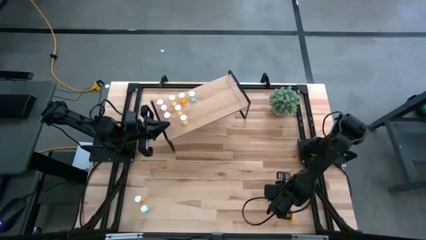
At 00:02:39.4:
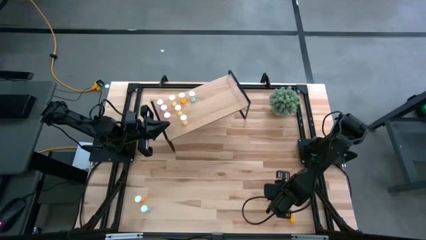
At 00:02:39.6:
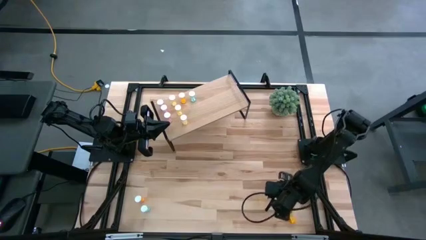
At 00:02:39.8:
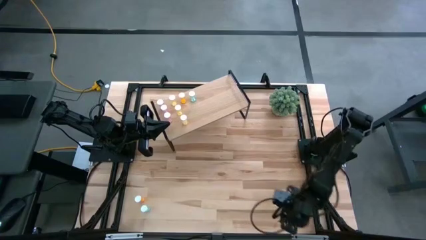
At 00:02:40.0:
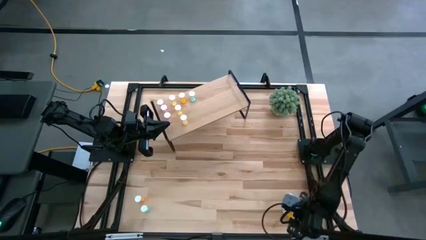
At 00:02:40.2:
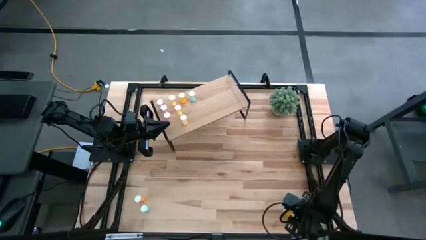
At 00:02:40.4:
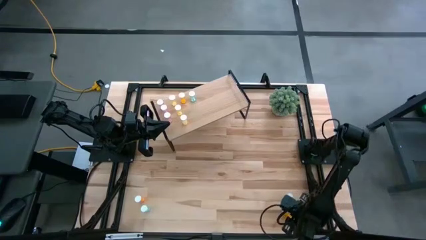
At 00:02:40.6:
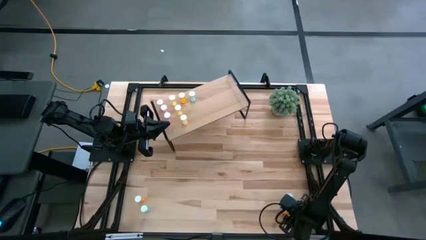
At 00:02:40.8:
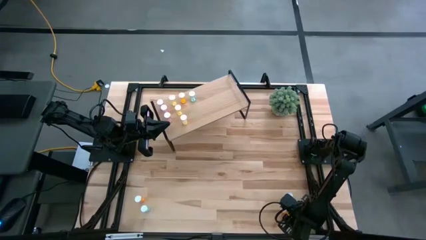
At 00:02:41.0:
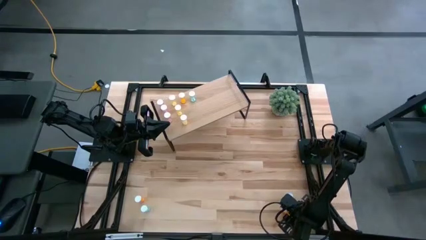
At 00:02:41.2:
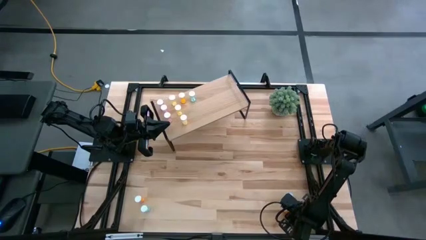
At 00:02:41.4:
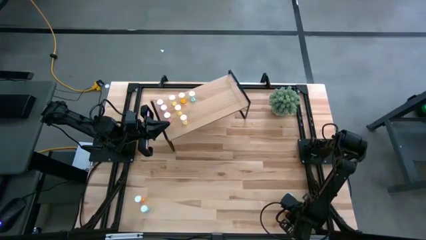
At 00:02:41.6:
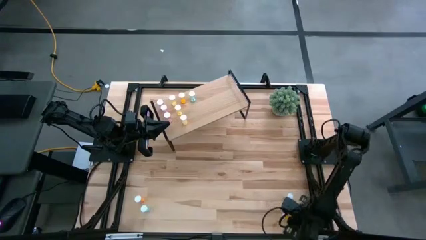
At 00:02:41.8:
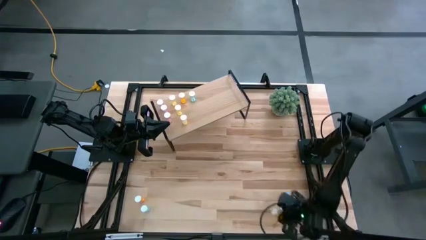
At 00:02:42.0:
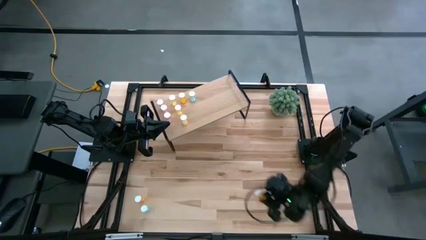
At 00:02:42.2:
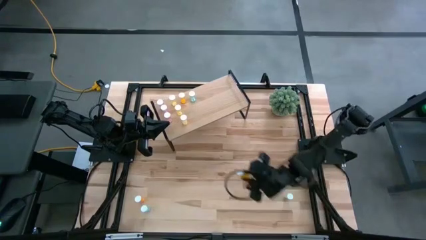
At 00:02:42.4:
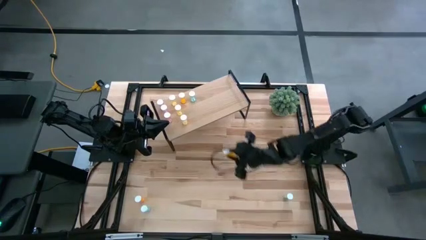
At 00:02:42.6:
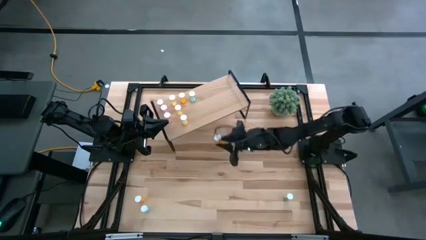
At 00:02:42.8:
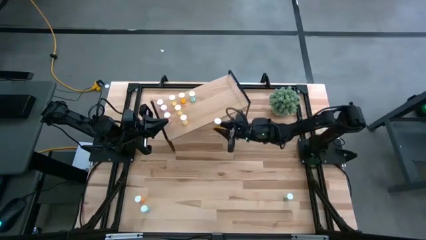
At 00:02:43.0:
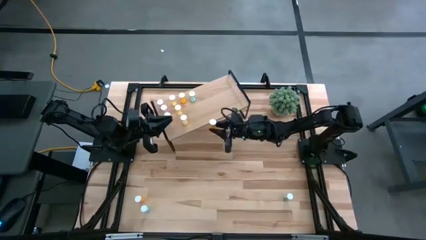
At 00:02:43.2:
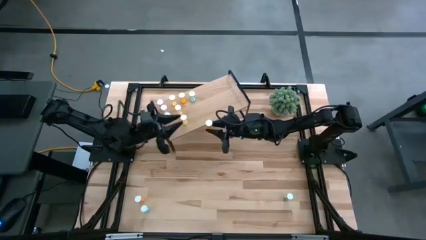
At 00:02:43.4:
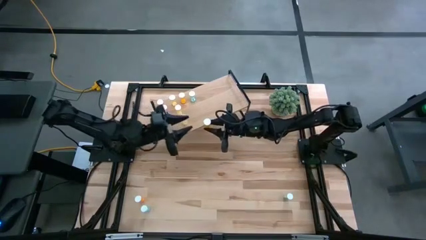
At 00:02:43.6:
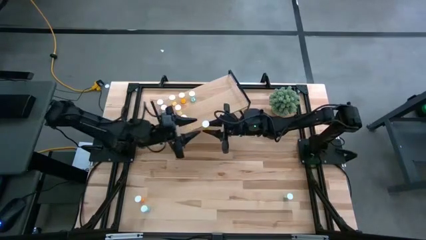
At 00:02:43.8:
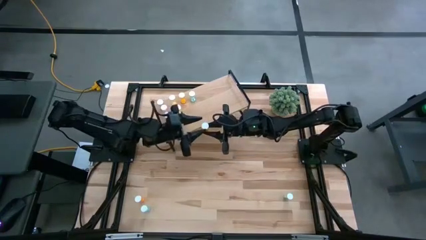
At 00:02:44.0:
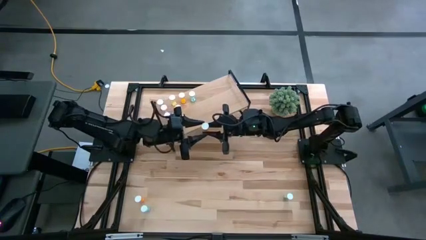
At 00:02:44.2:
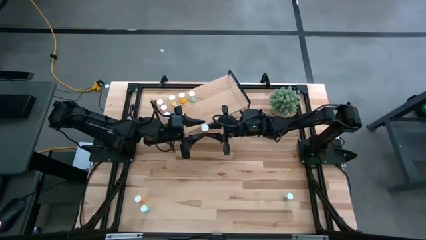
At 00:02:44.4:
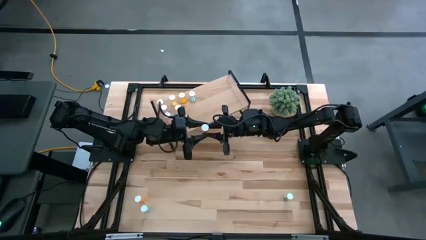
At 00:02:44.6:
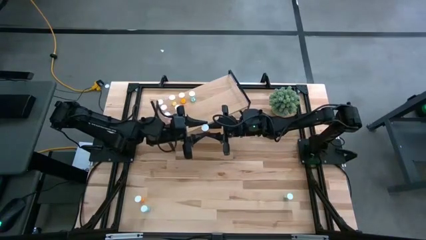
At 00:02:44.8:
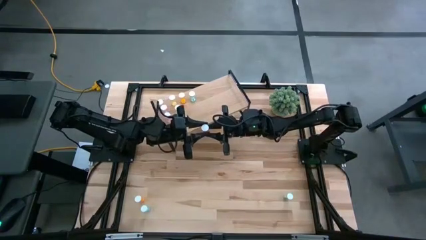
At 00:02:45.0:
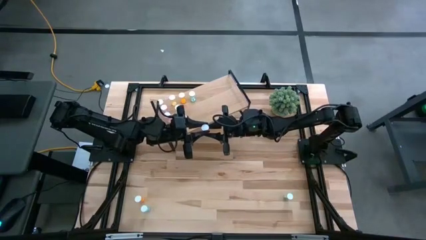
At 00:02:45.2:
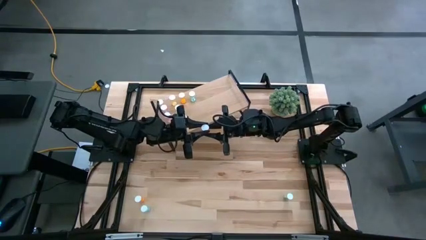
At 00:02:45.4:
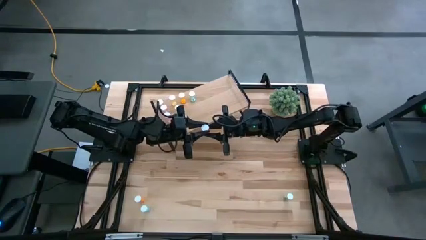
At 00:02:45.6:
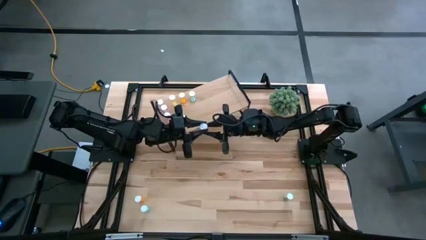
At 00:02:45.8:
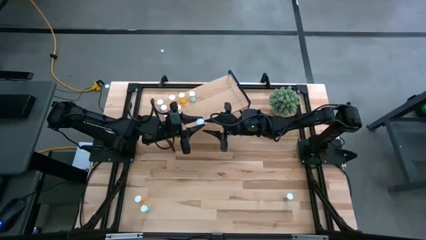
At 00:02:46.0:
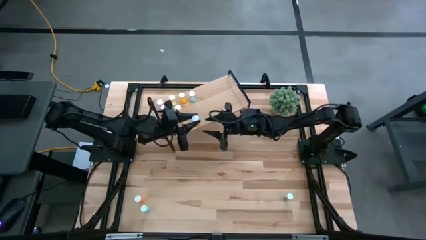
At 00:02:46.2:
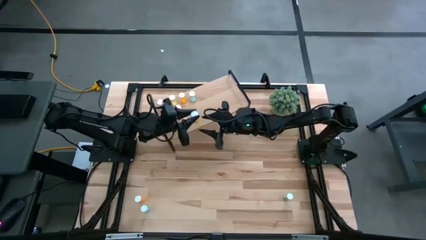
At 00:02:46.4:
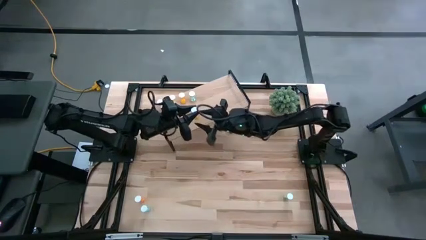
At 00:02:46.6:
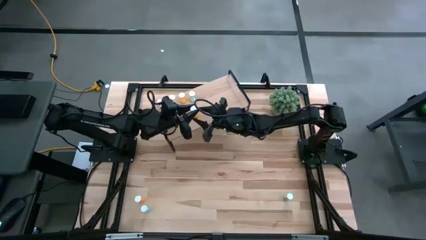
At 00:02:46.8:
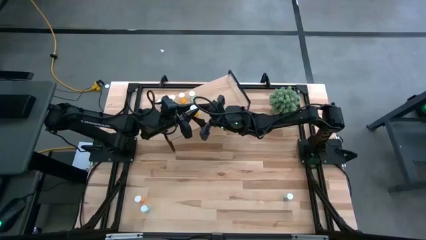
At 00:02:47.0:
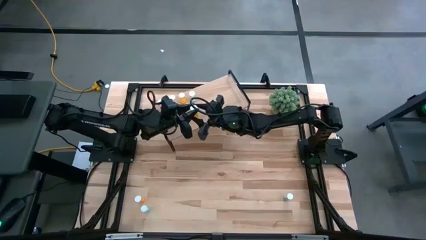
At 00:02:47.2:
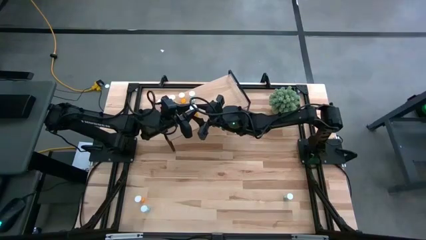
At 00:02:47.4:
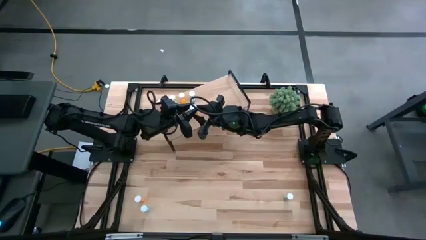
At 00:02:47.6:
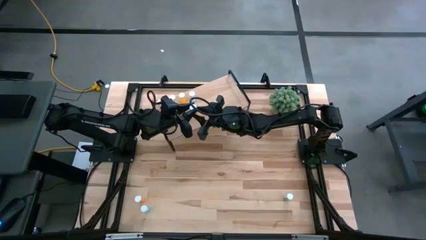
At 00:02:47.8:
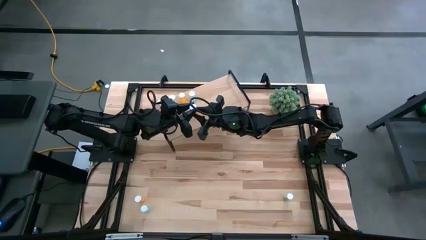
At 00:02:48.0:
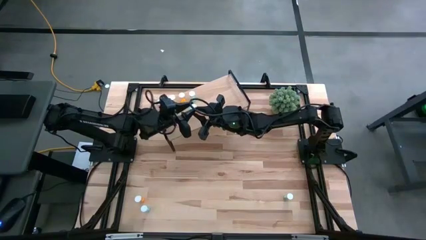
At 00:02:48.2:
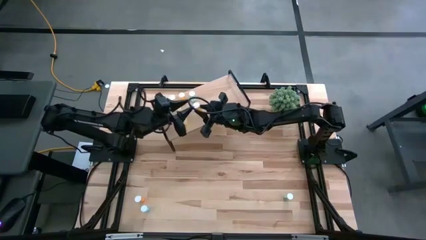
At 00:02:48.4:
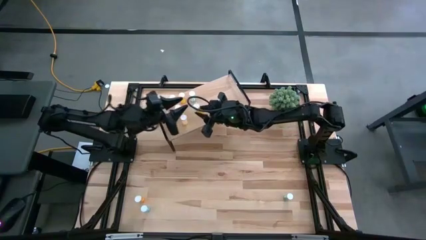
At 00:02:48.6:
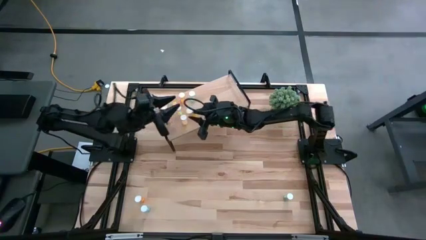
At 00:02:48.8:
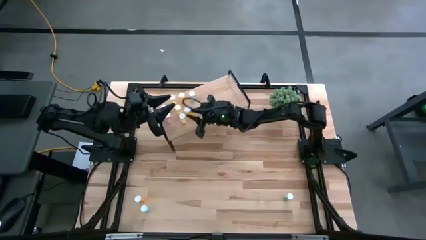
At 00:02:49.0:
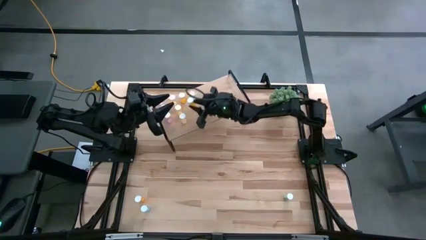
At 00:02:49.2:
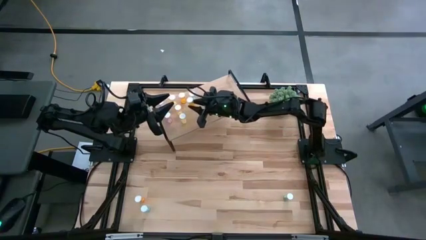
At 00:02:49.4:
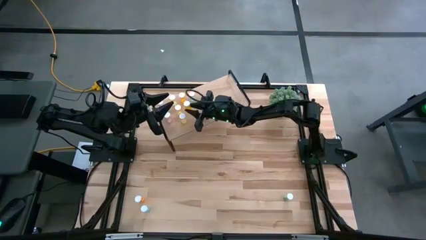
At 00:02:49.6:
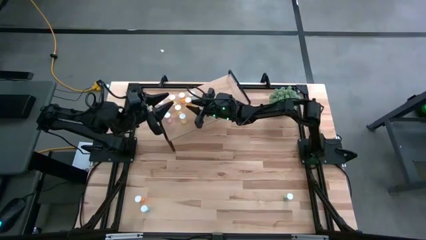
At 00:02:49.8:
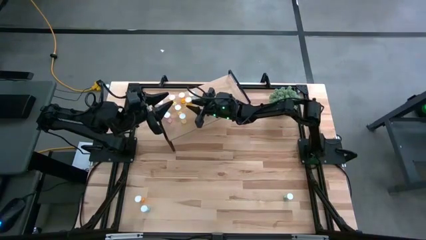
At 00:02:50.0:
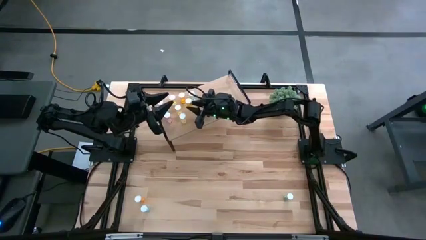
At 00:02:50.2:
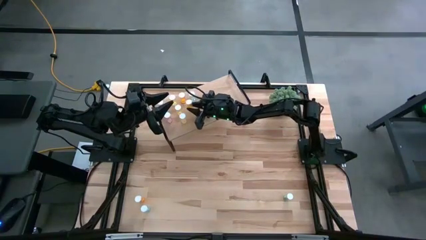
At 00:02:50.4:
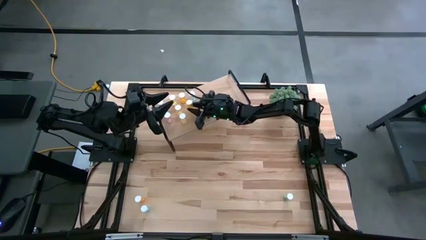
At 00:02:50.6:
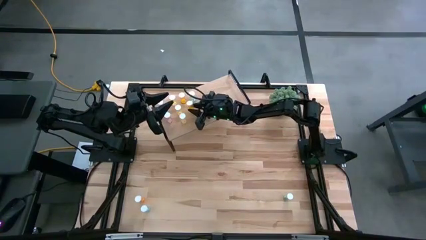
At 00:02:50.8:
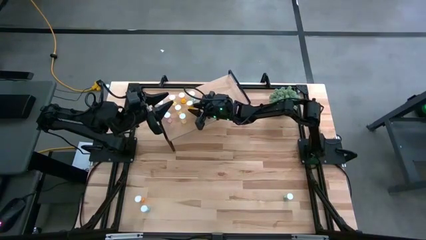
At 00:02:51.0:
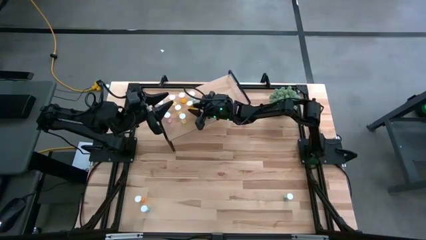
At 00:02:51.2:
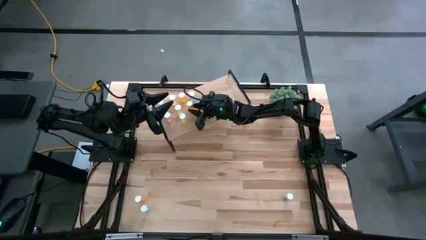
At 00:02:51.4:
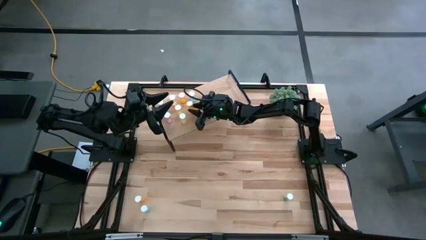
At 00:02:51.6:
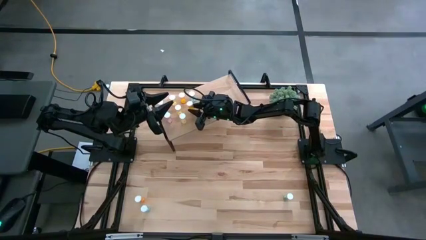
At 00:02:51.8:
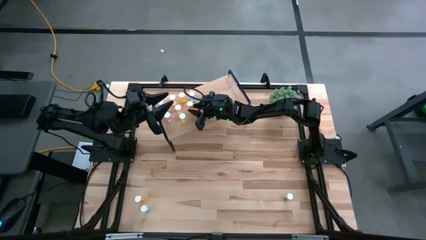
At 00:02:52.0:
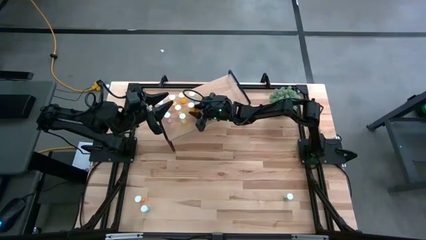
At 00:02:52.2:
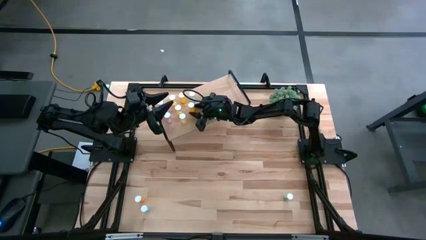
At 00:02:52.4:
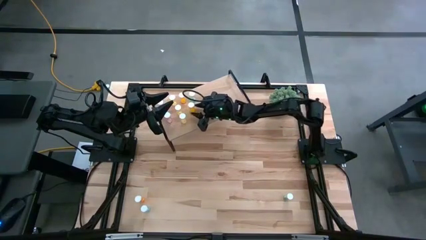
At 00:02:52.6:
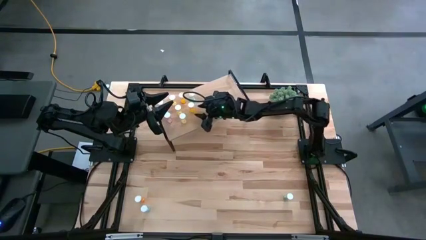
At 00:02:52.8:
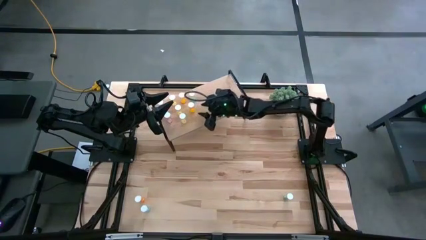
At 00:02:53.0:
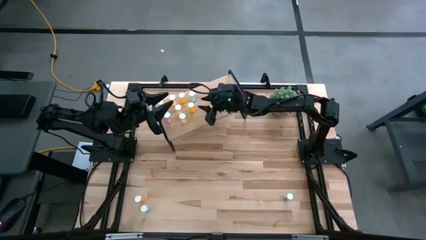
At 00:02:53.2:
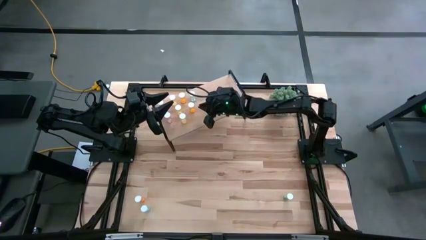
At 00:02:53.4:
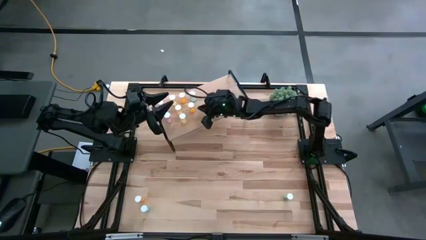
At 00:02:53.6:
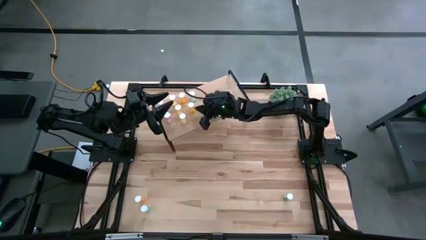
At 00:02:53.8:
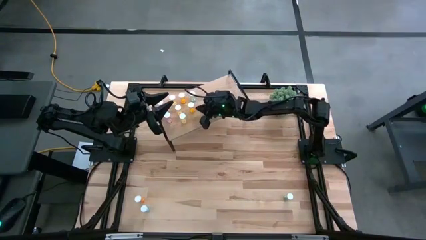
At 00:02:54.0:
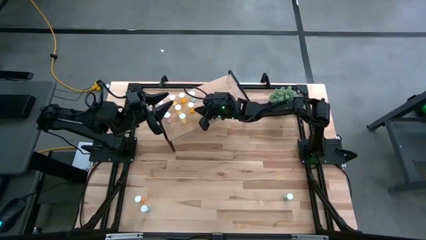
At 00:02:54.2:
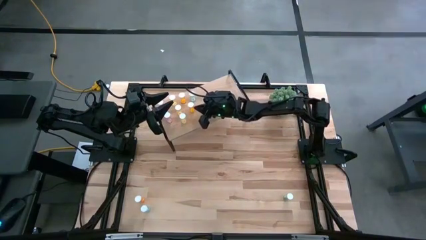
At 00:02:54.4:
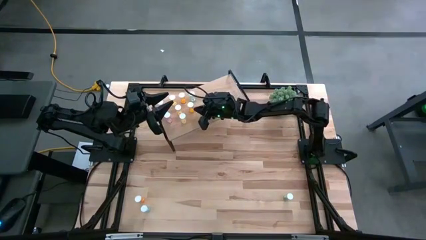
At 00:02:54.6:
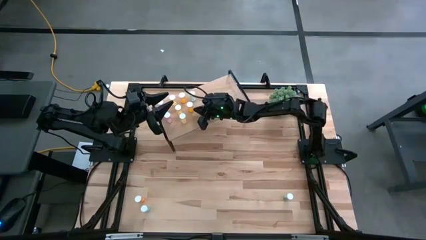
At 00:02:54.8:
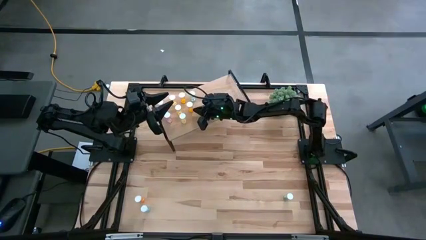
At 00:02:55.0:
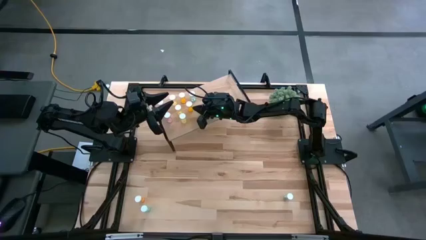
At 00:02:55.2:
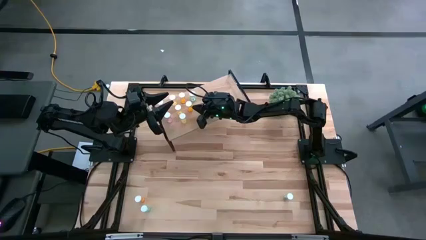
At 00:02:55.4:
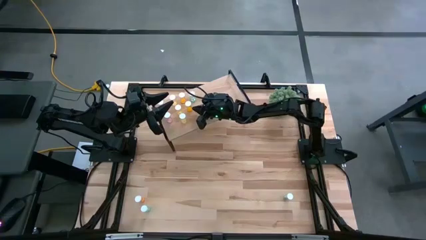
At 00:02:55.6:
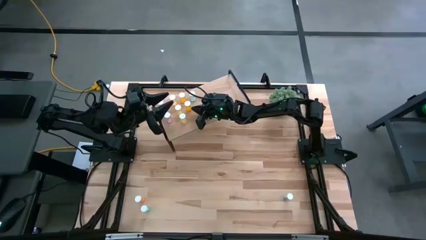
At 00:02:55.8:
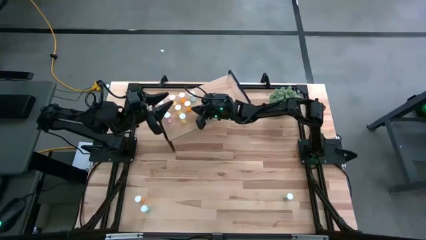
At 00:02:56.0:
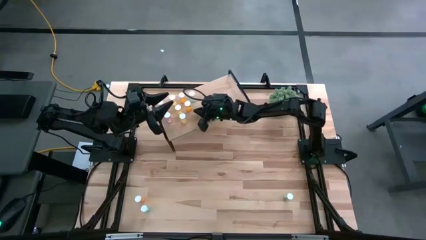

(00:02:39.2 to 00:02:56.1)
Task: Pick and place medicine bottles onto shelf by color
Put the right orange pill bottle on the shelf aligned with the other orange pill bottle
